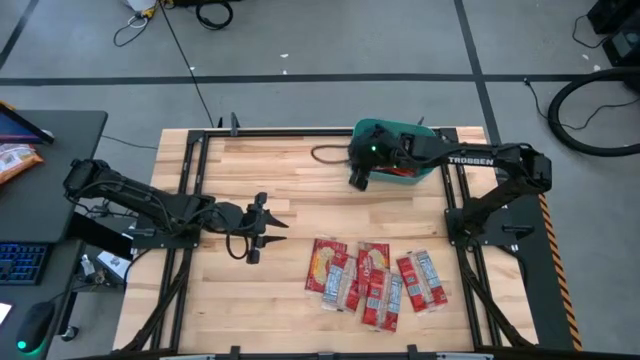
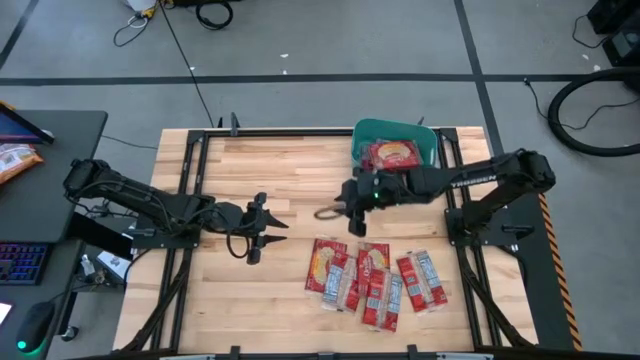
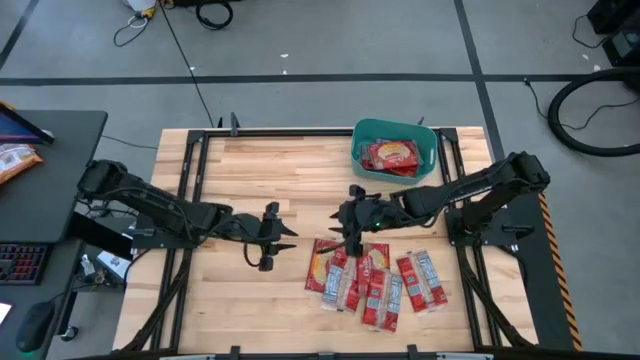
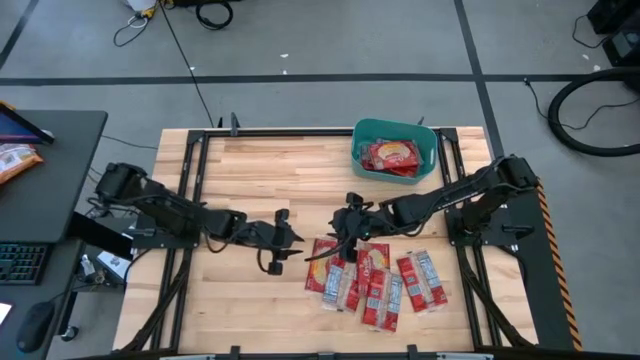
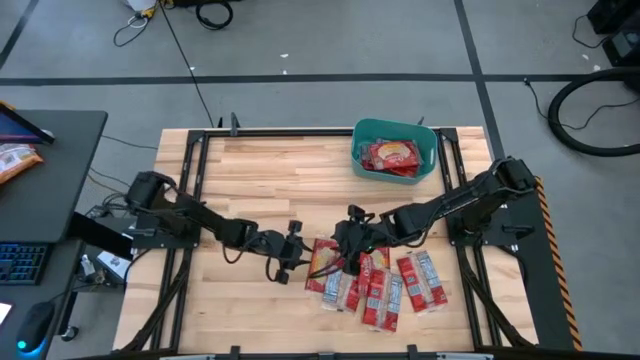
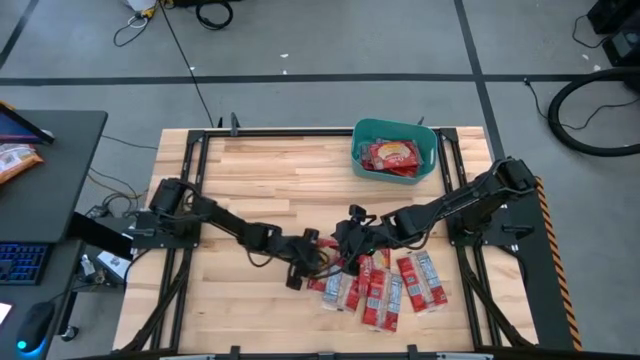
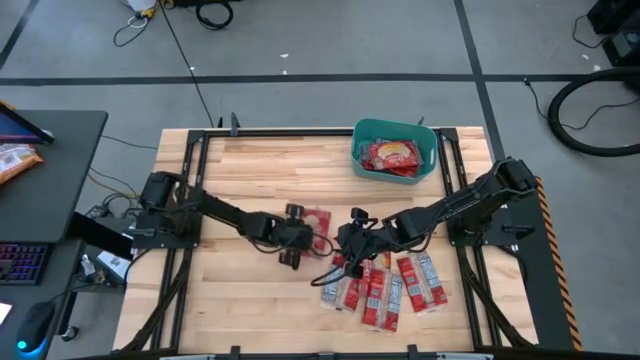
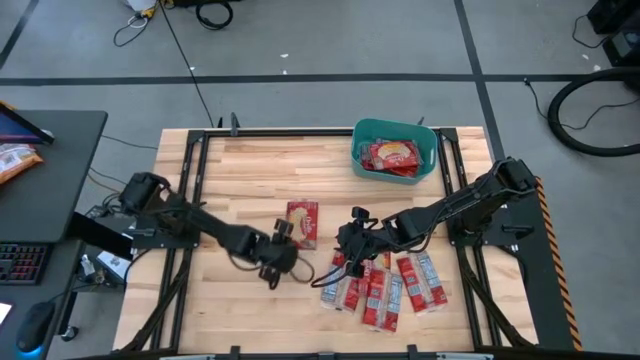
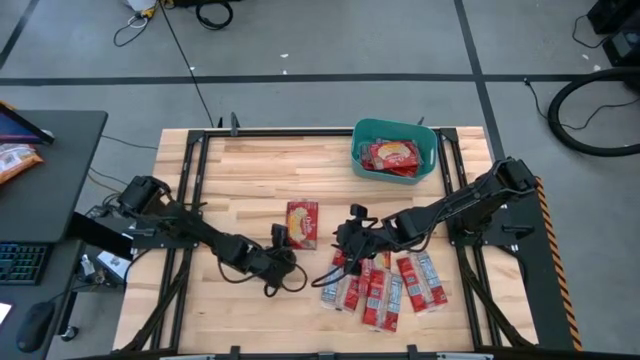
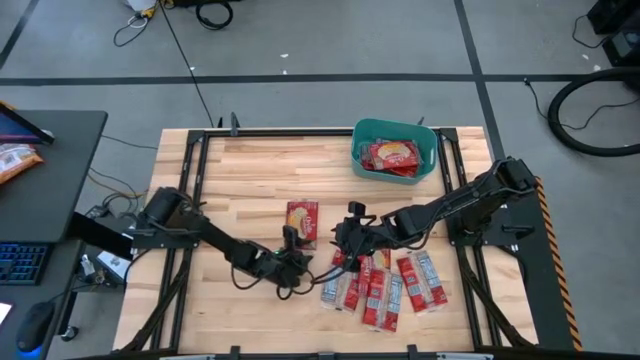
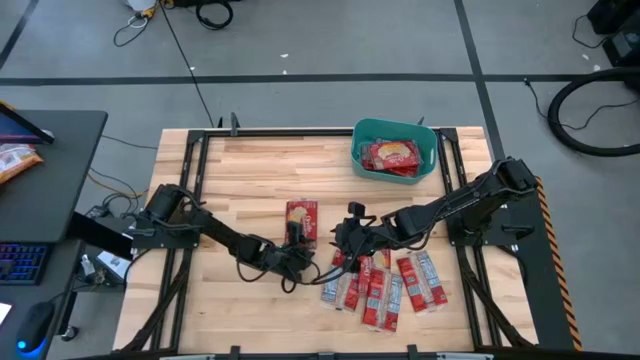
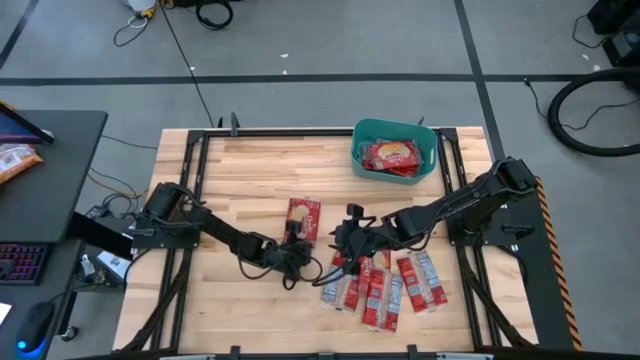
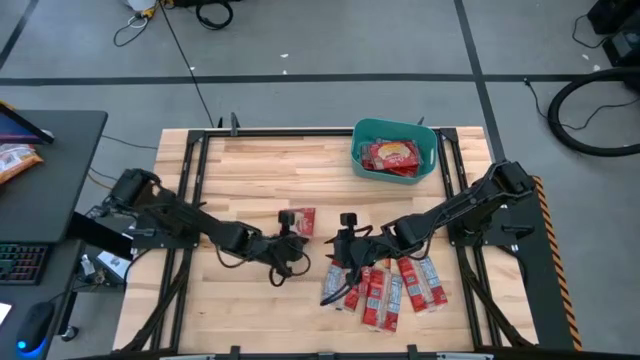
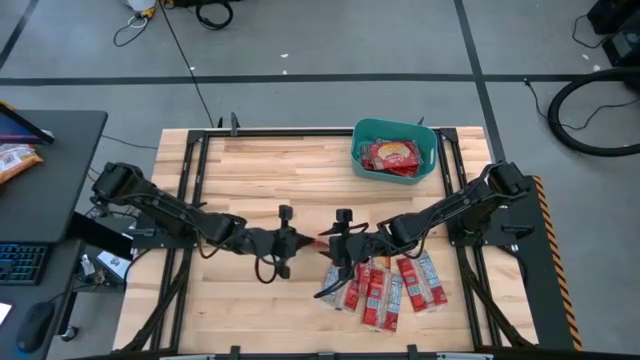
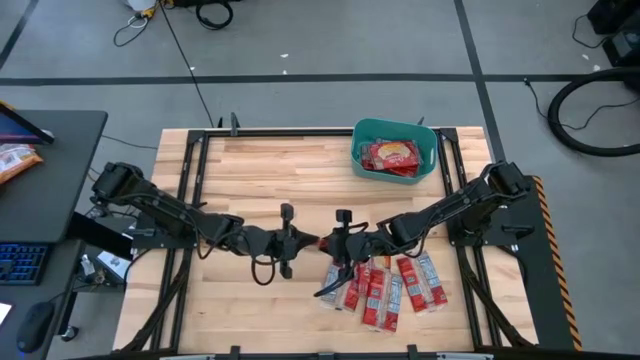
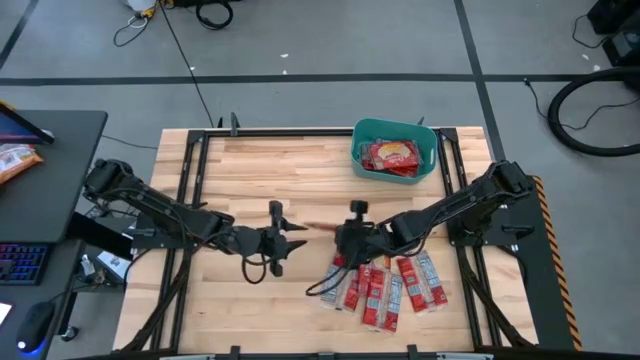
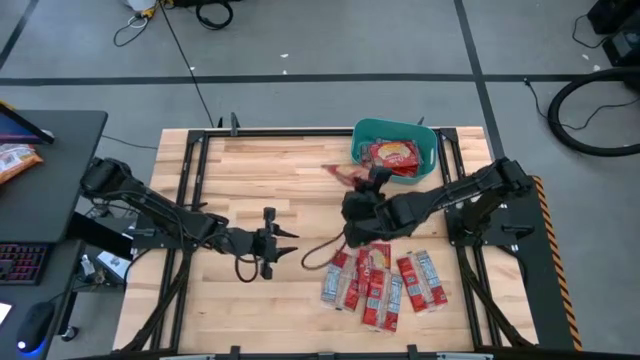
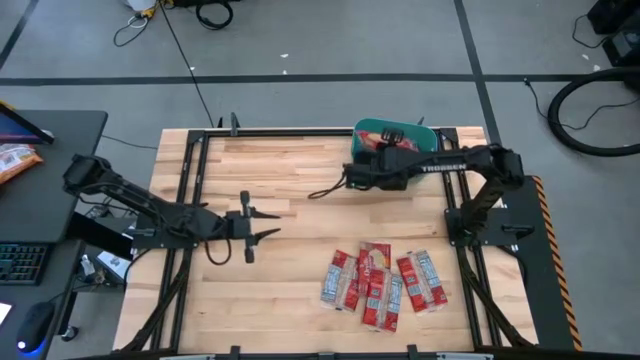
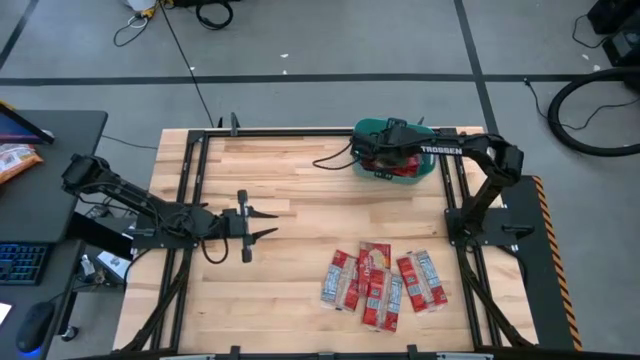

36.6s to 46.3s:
Task: Sort popcorn bags into baskets
Put the red popcorn bag into the green bin

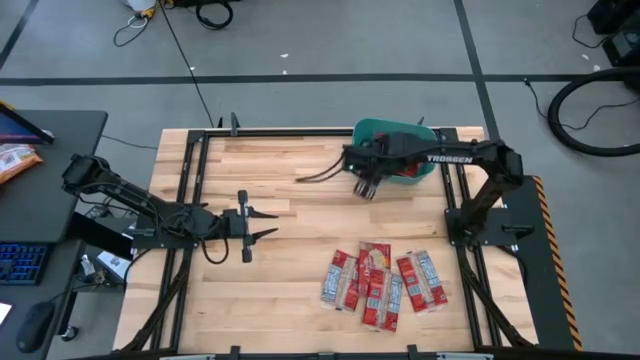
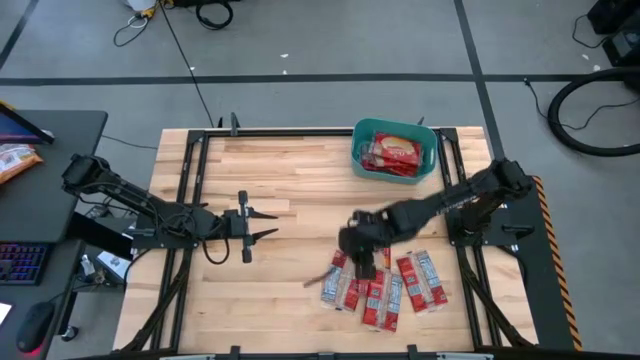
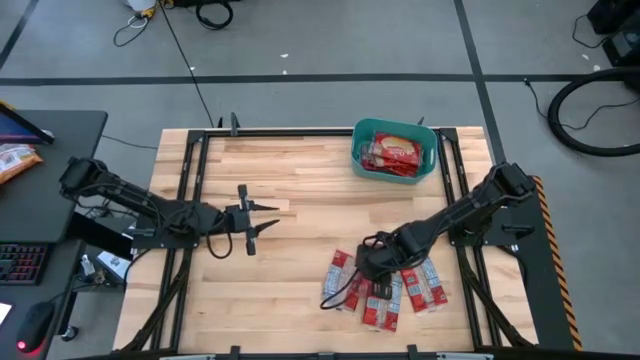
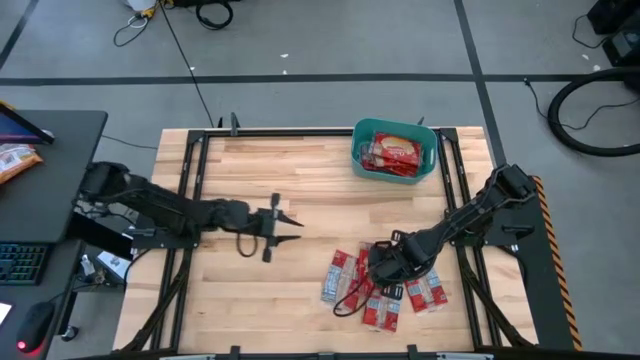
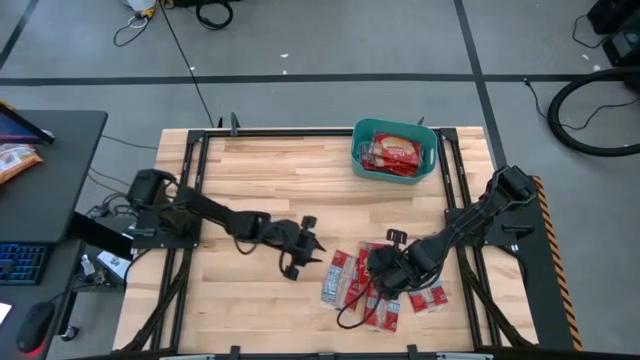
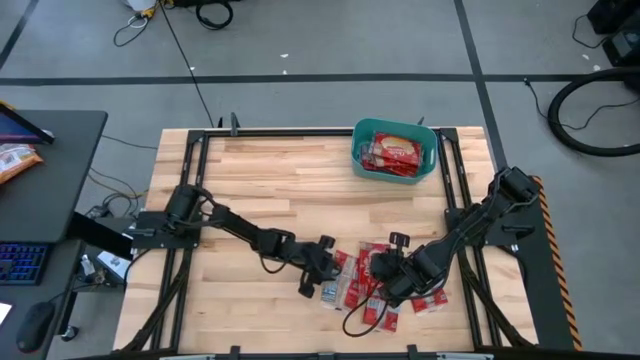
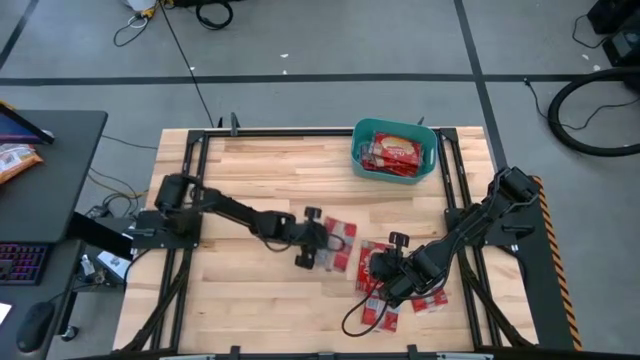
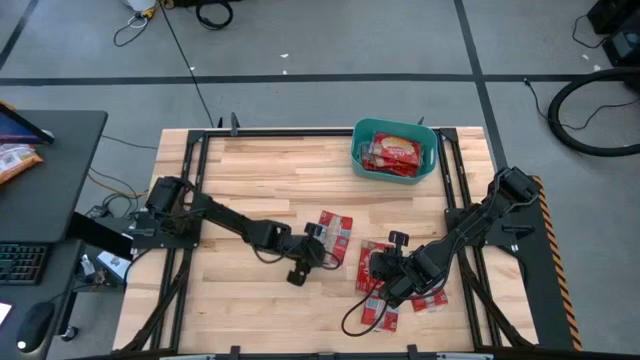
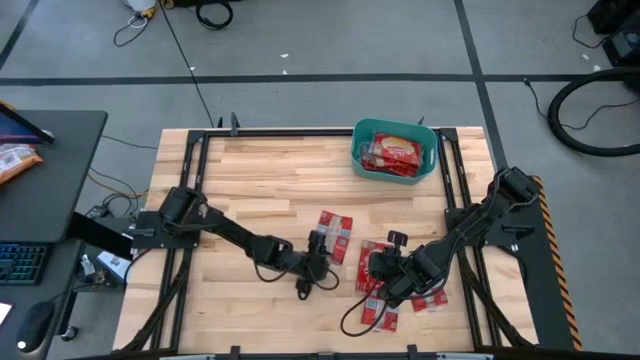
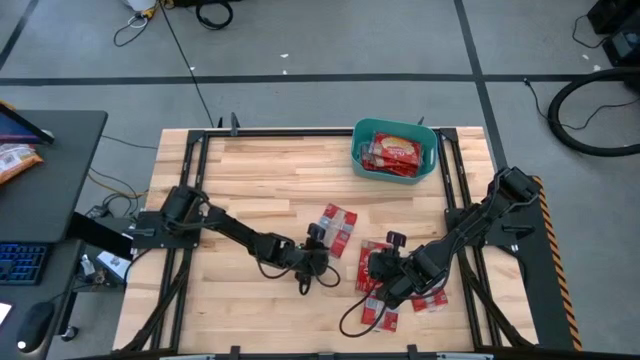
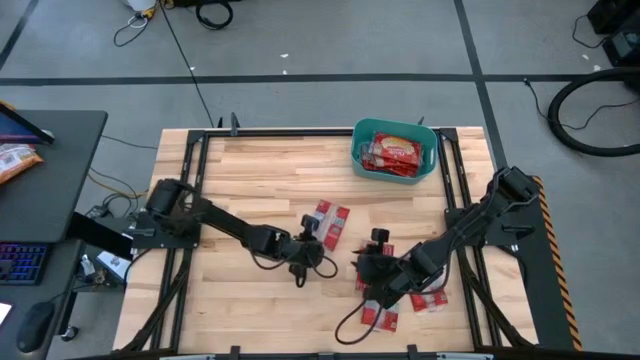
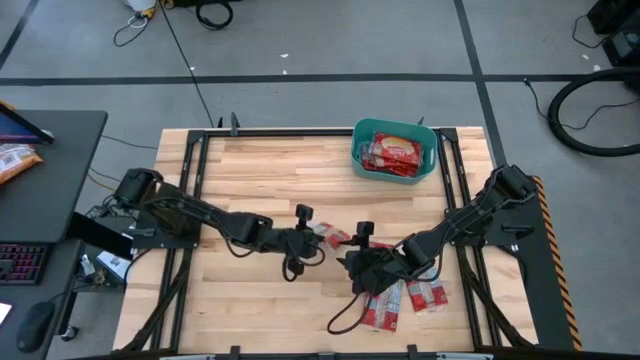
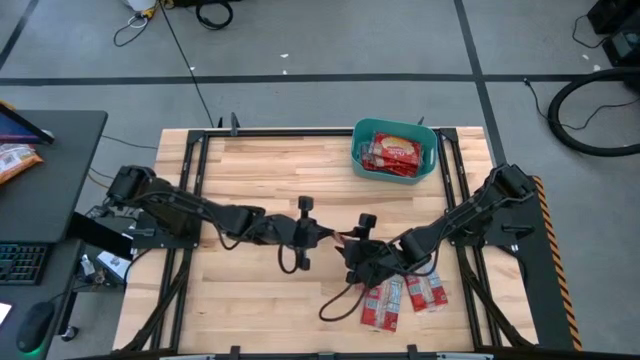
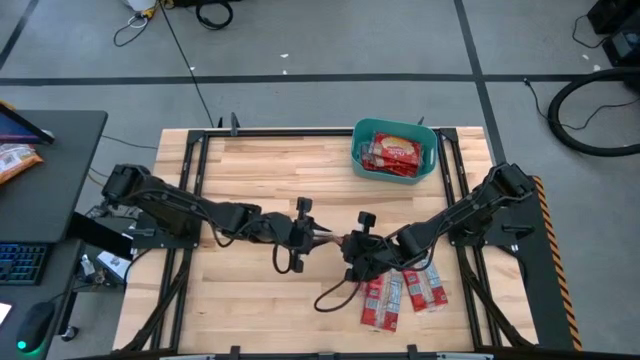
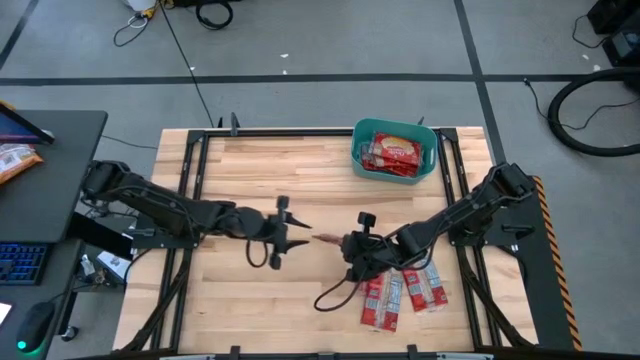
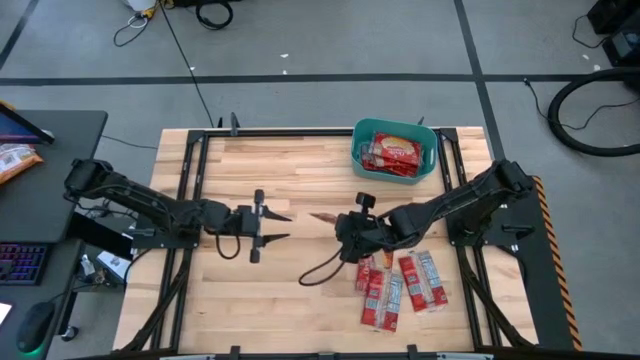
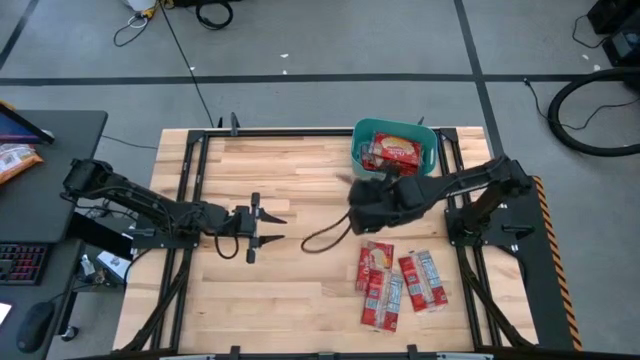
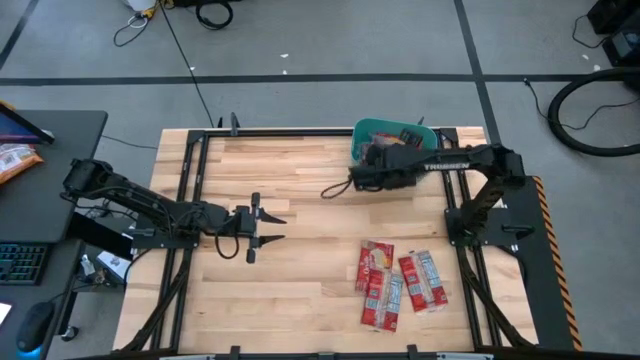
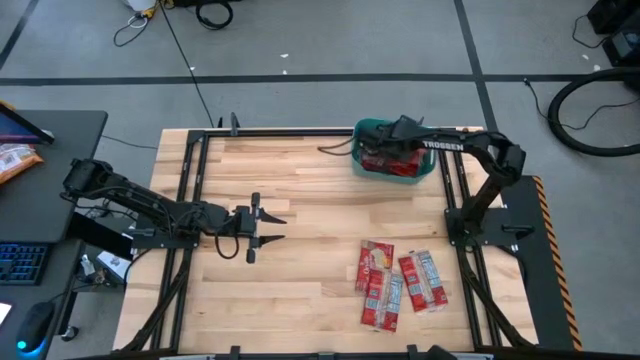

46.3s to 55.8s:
Put the red popcorn bag into the green bin

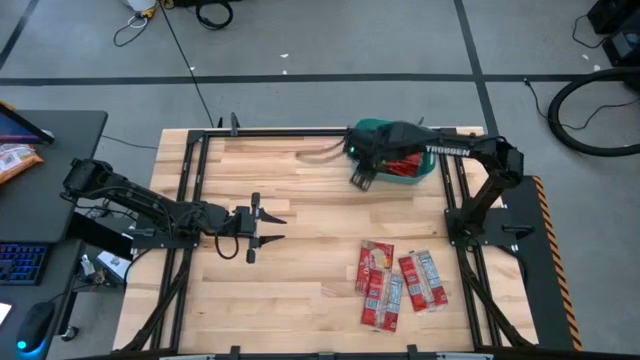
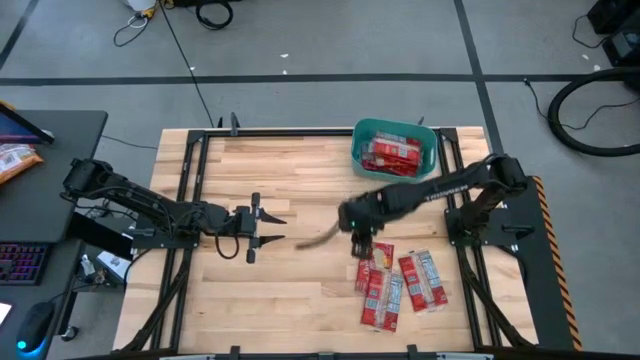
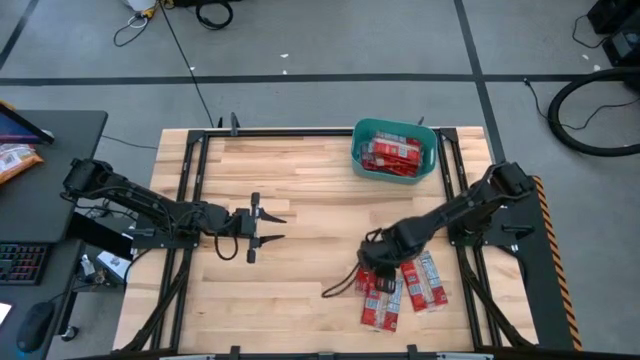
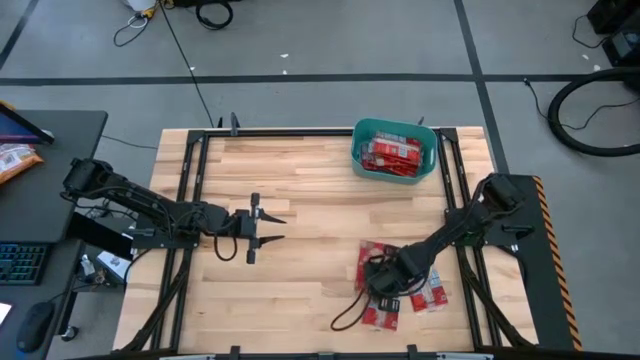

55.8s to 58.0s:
Move the red popcorn bags to the center of the table

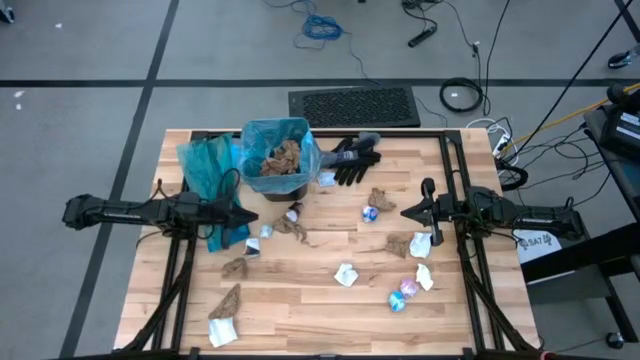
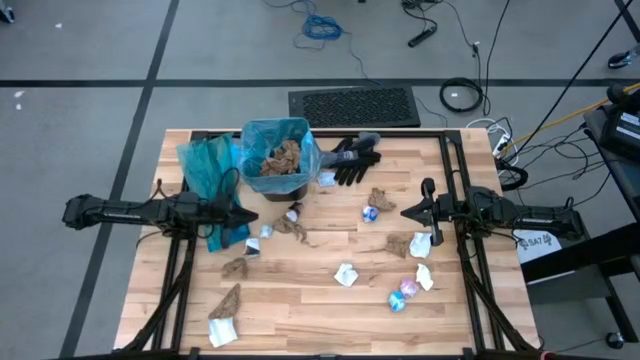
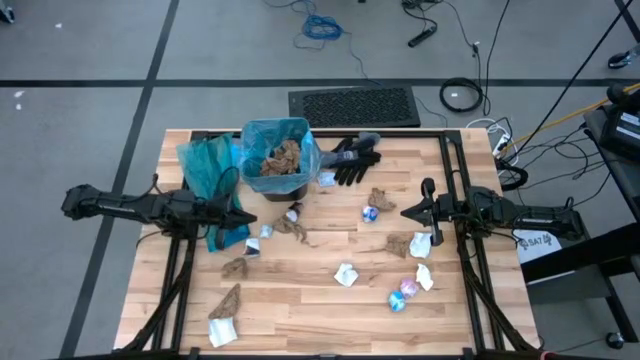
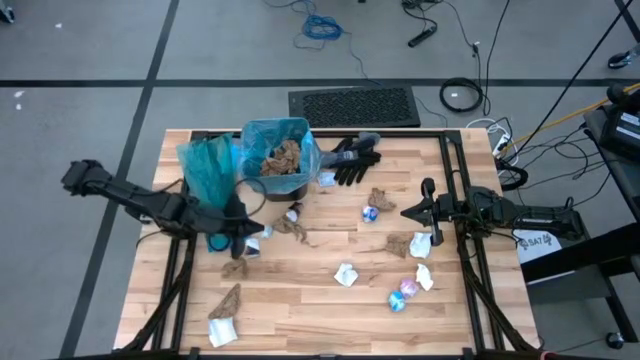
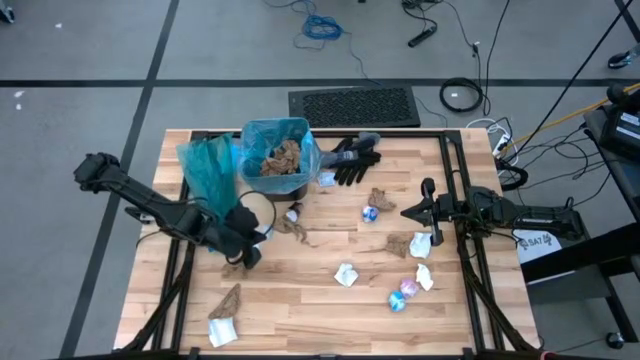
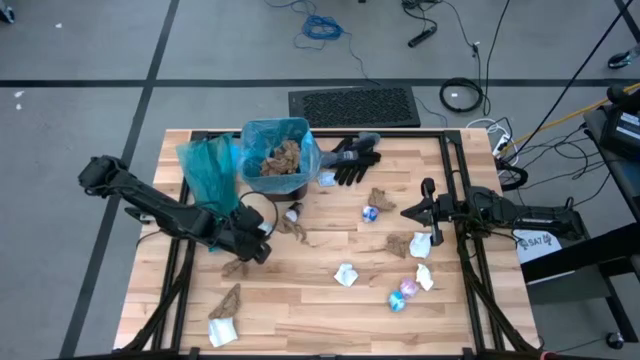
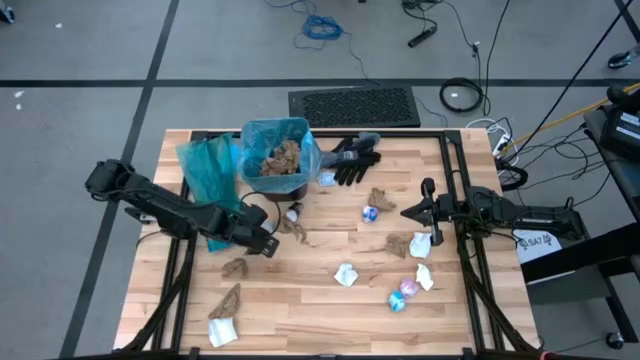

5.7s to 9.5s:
Task: place trash/remove bag and relplace
Put the white napkin into the trash bin
